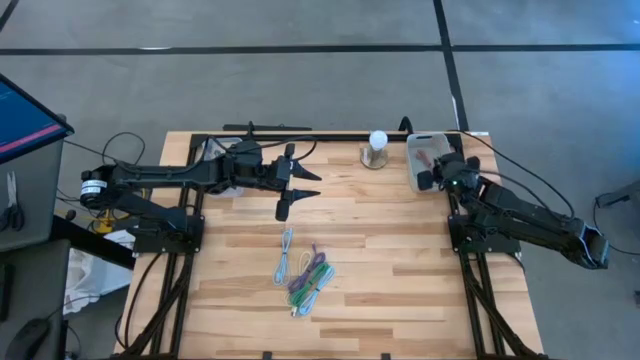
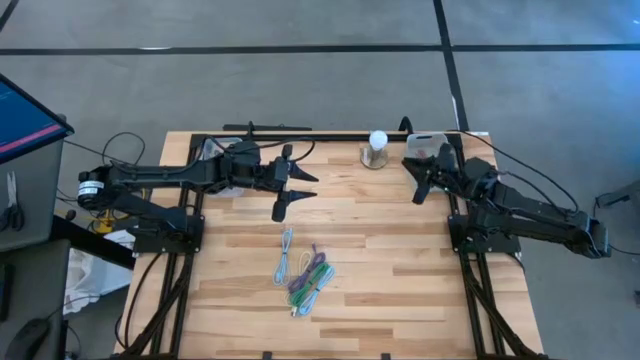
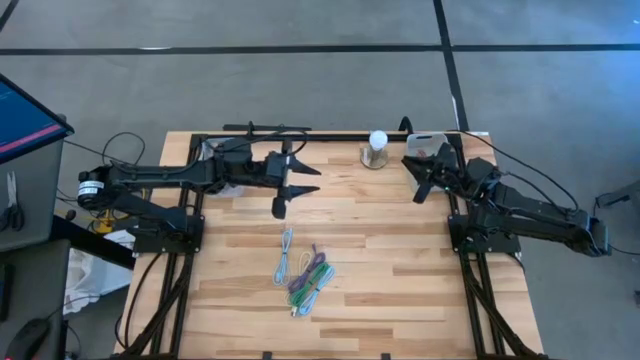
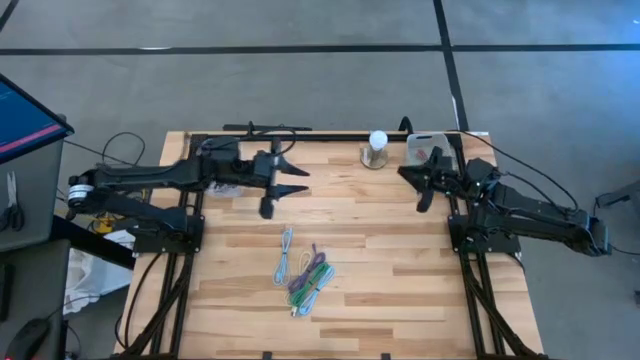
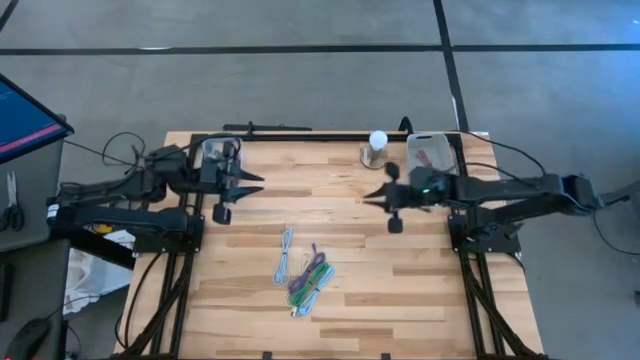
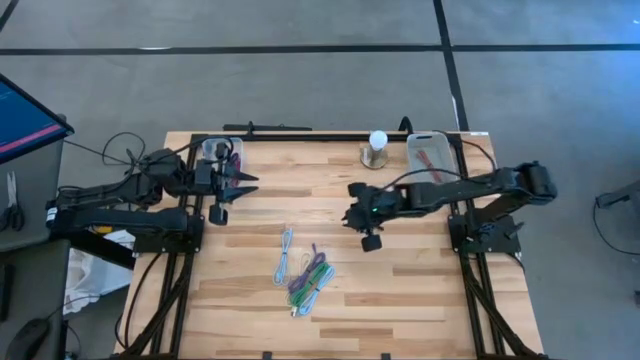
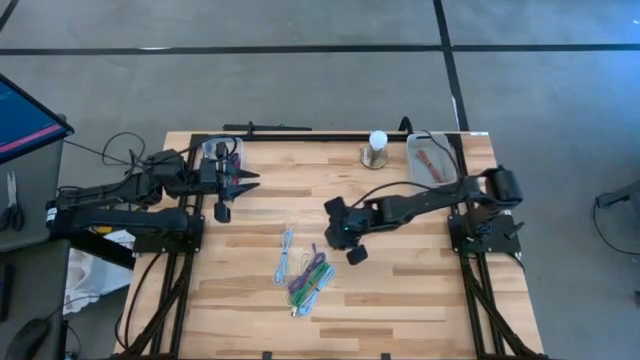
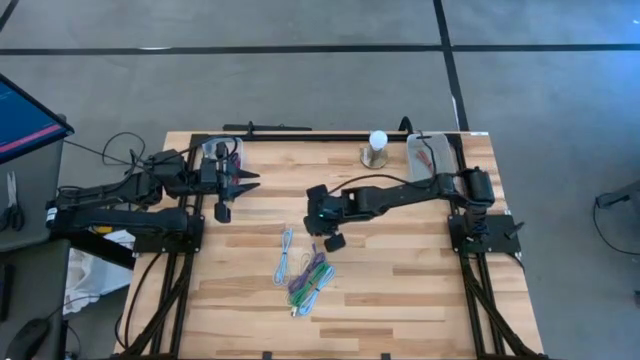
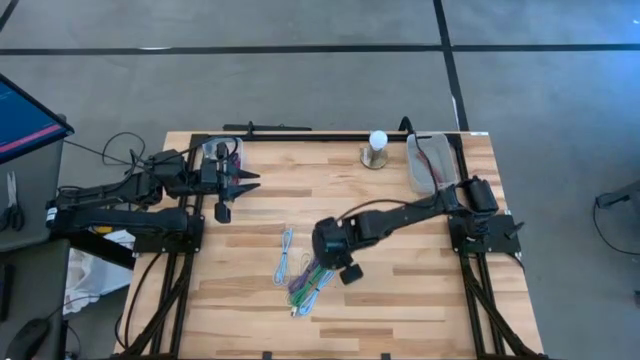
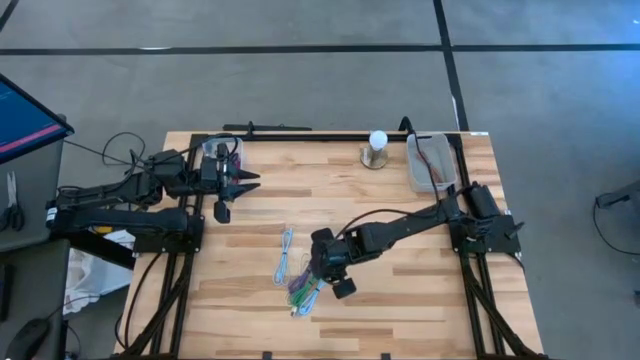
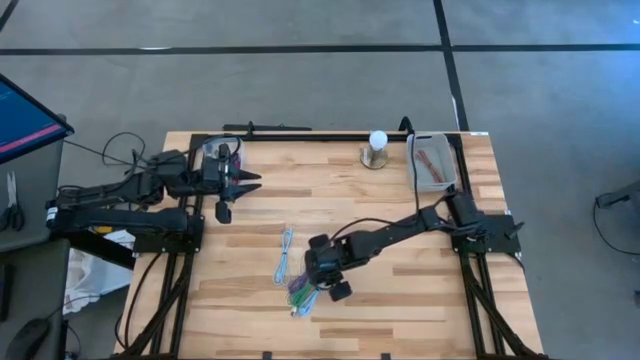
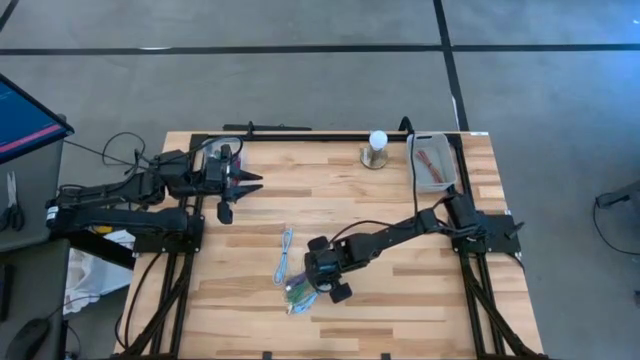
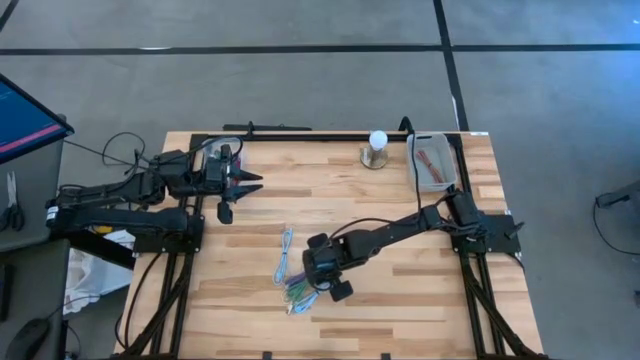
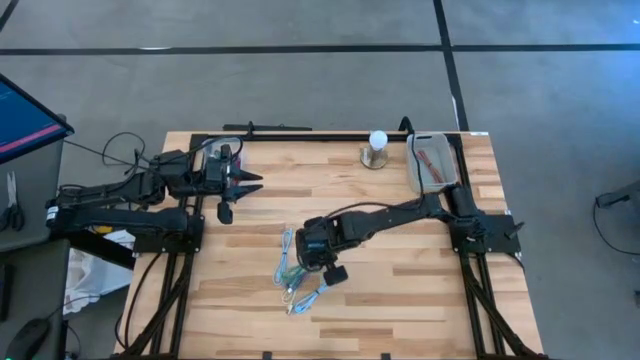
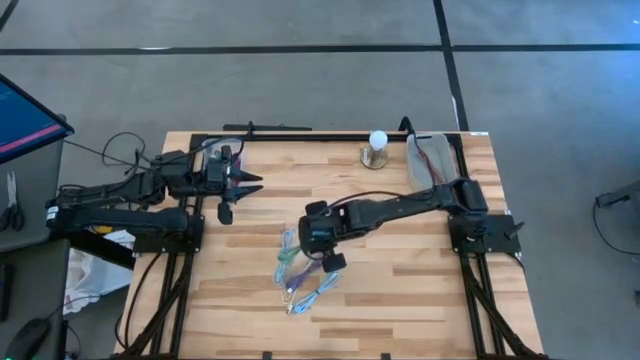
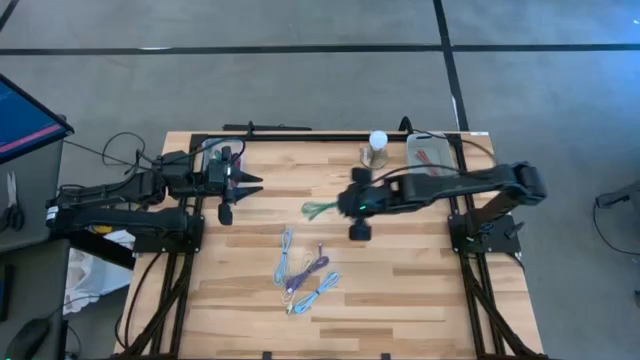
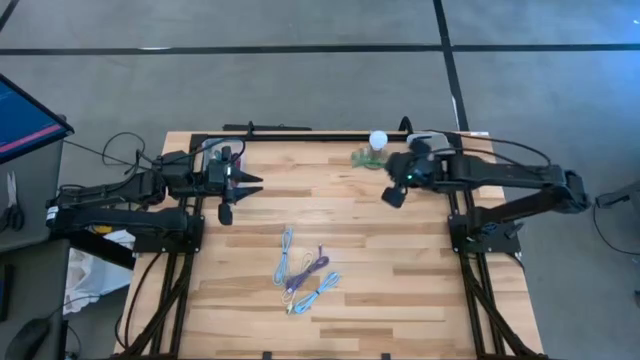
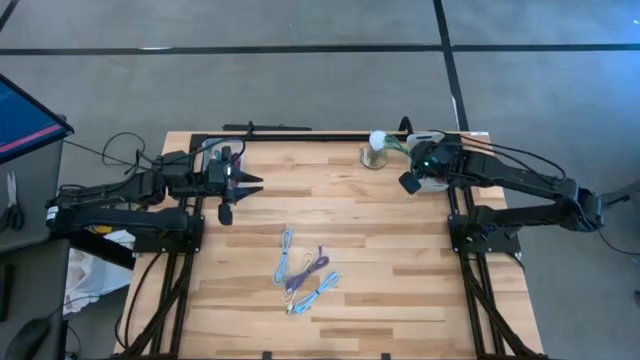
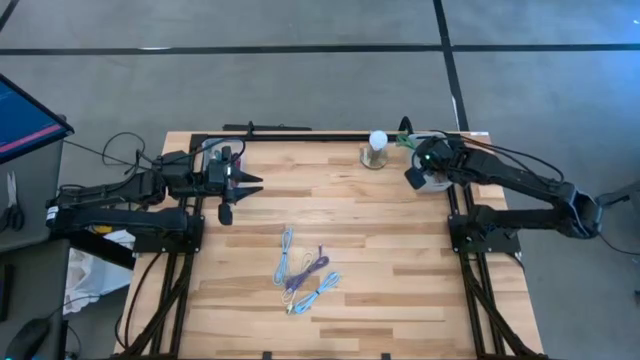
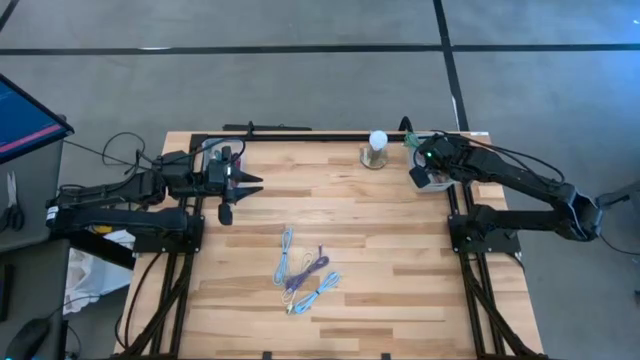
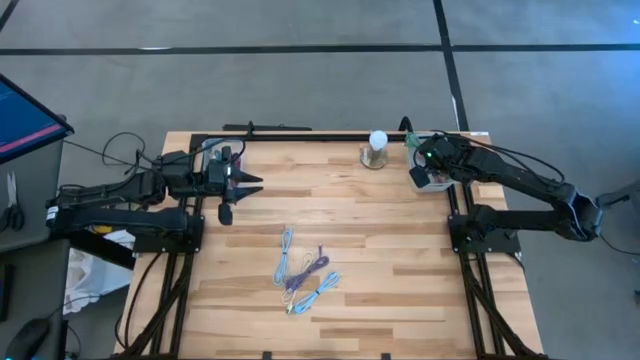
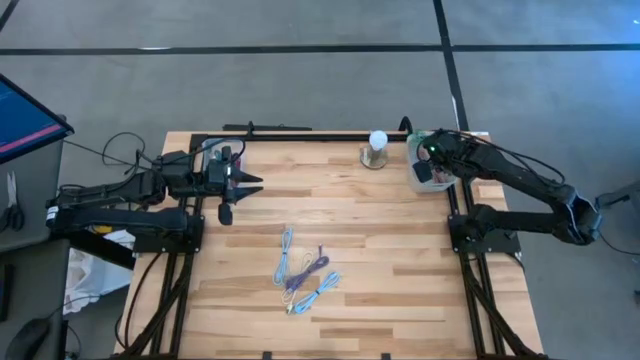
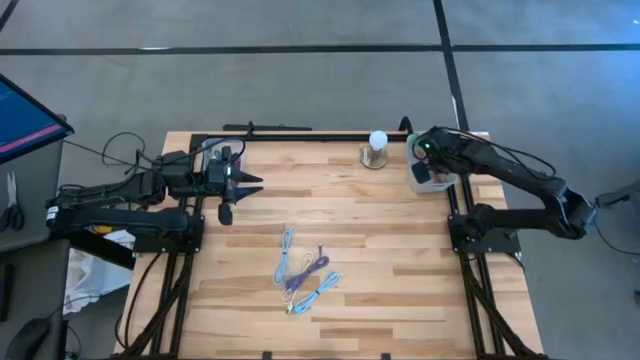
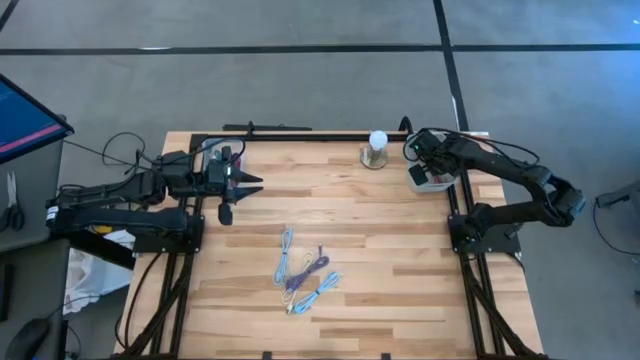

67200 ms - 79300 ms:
Task: Pick & Place USB Port
Put the green charger cable into the gray bin

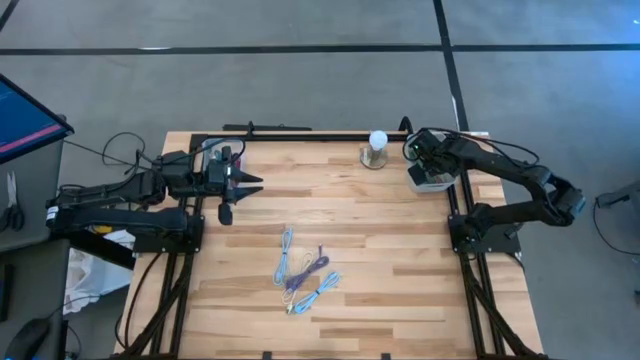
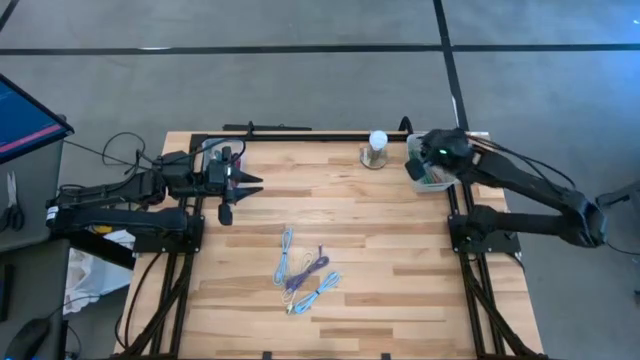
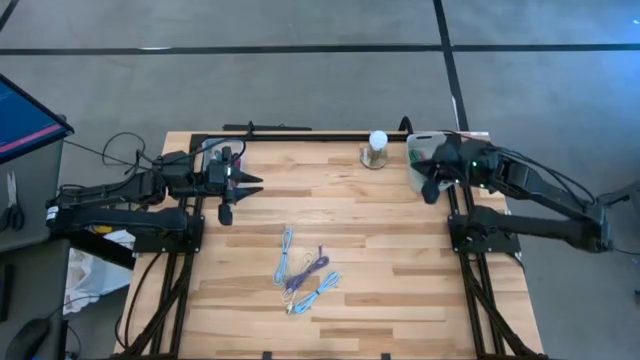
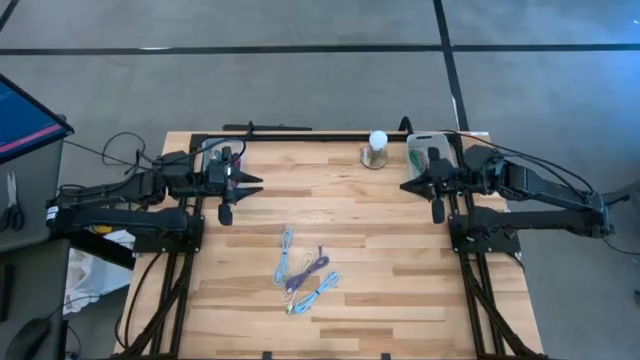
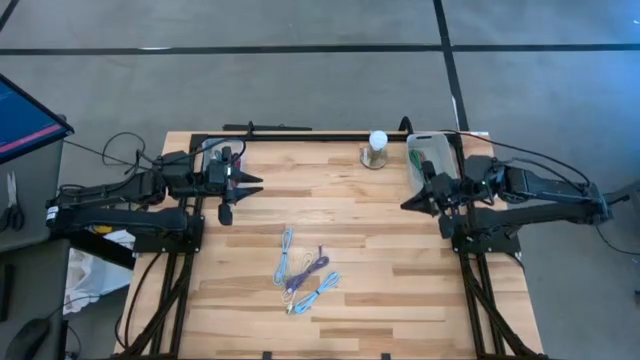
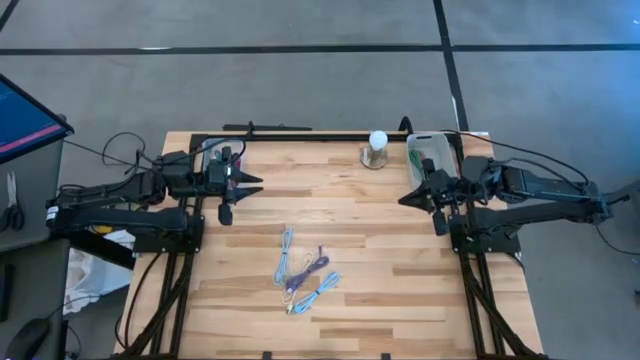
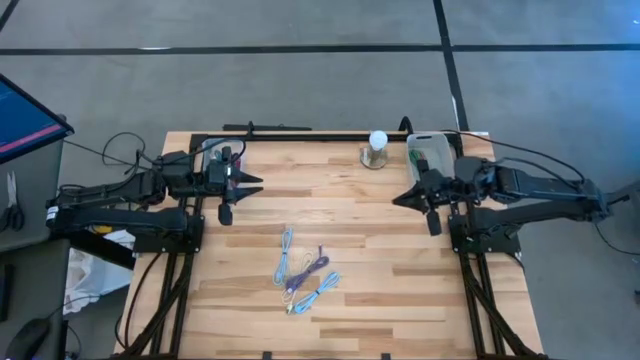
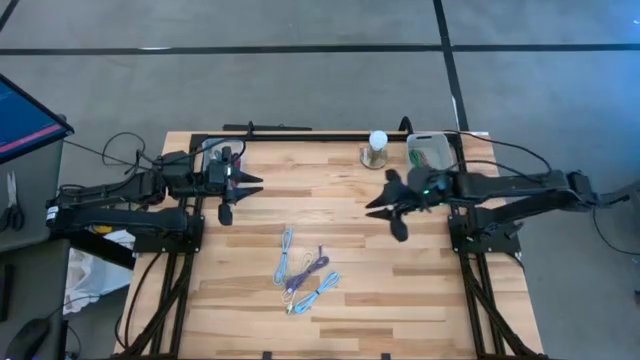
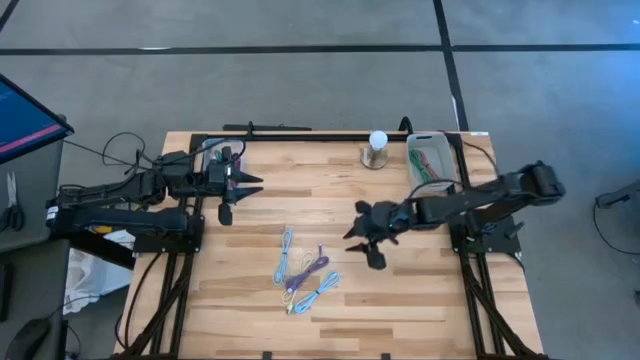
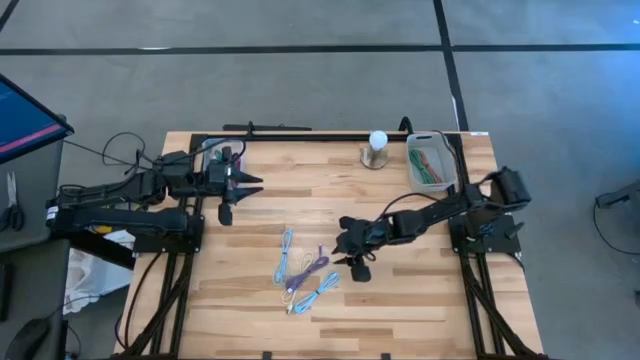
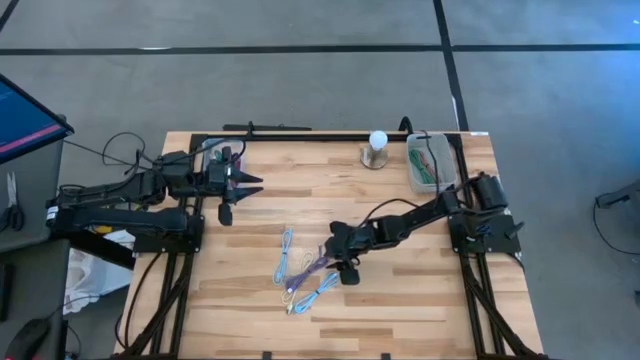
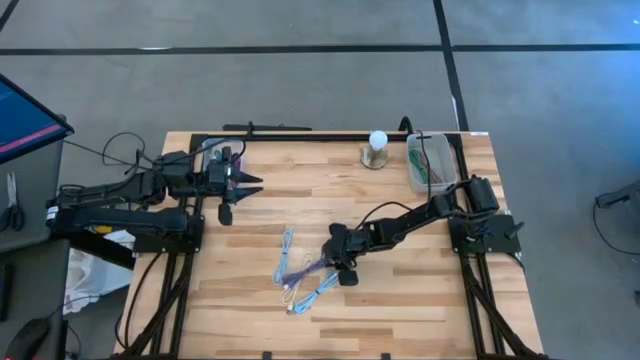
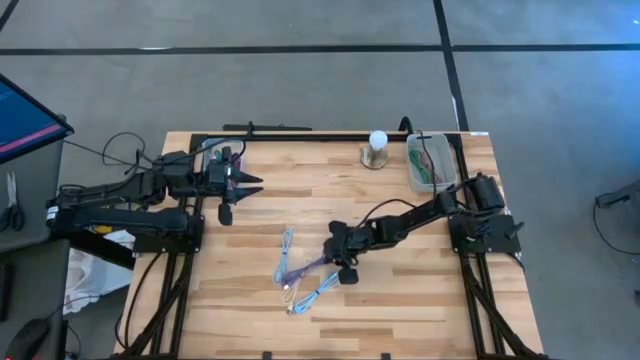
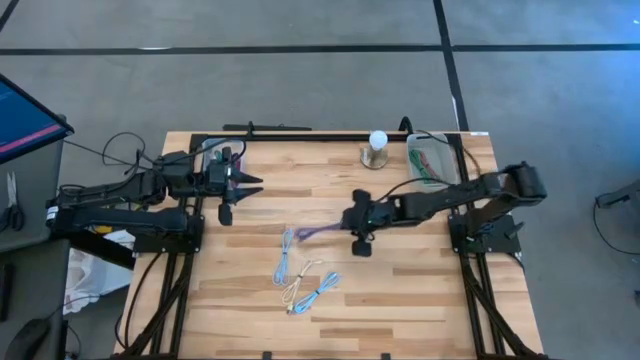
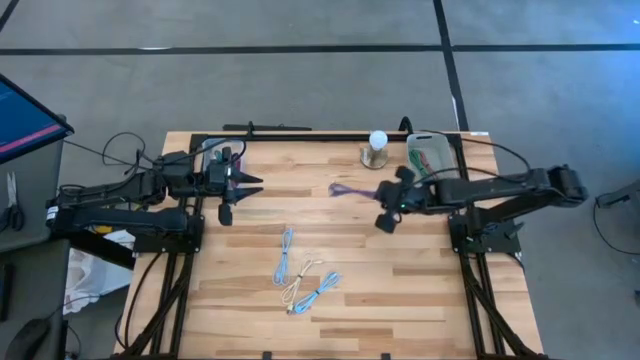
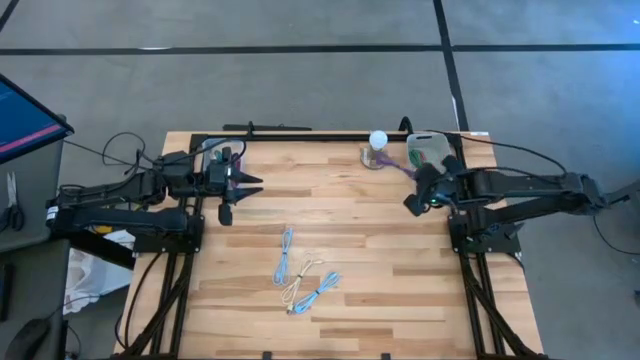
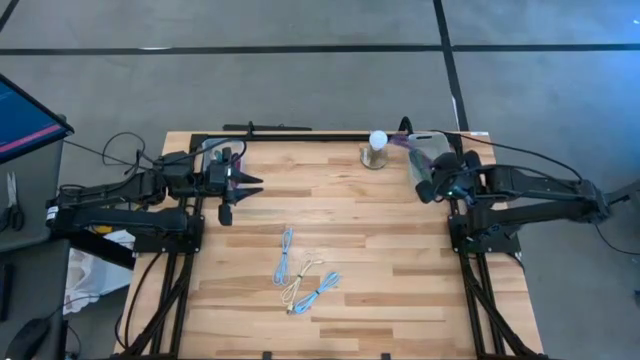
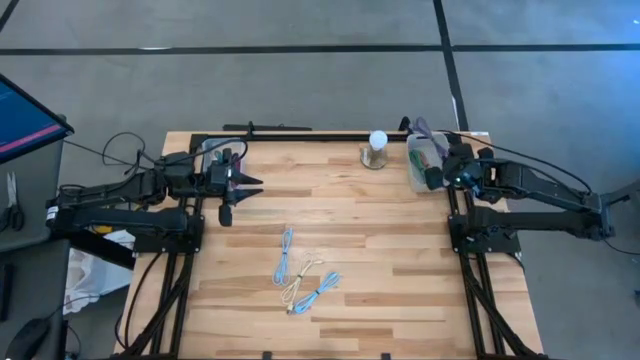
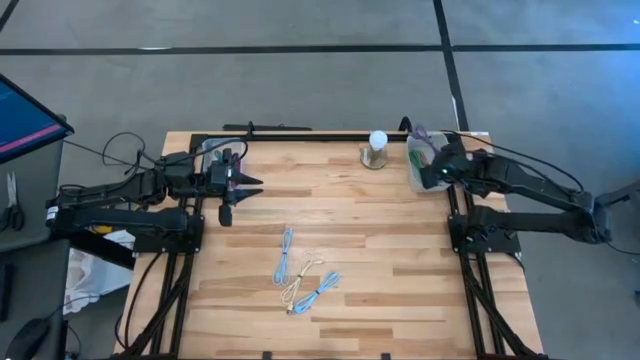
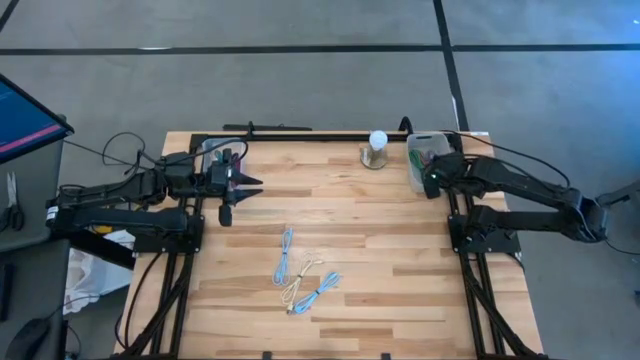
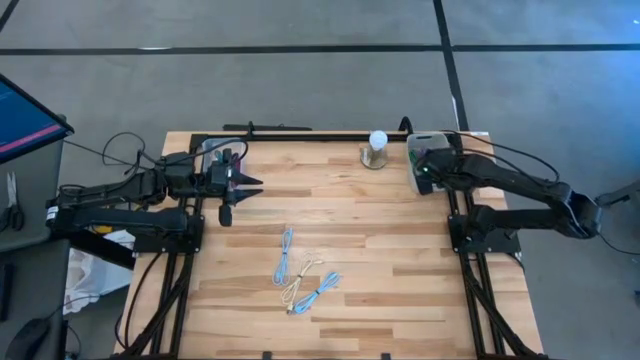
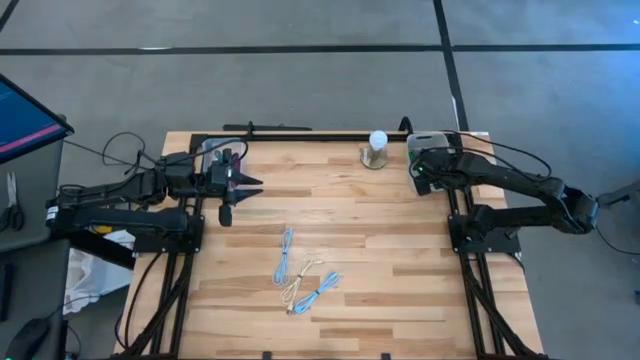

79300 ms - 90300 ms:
Put the violet charger cable into the gray bin
